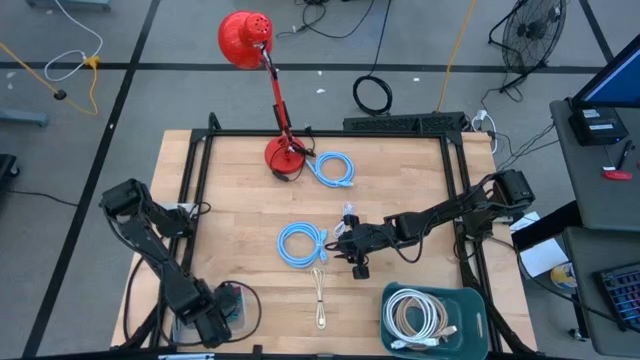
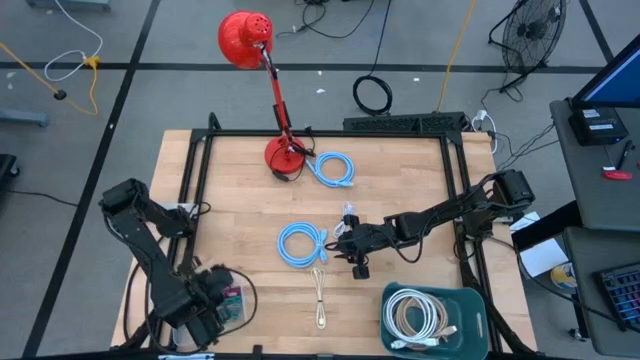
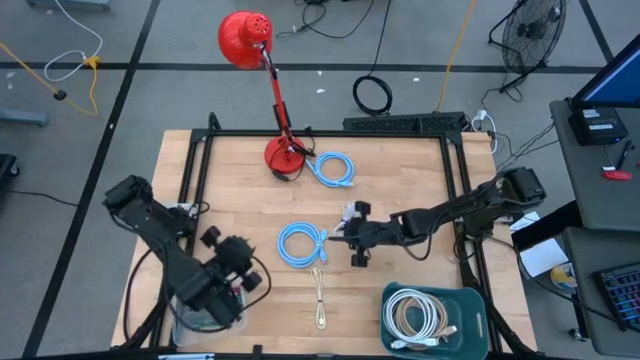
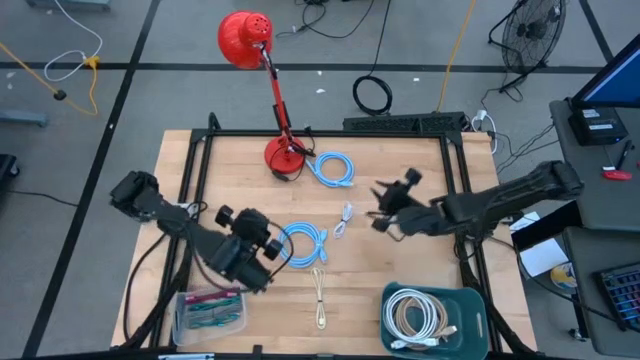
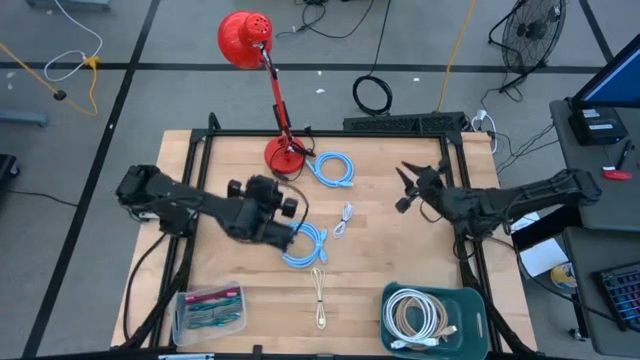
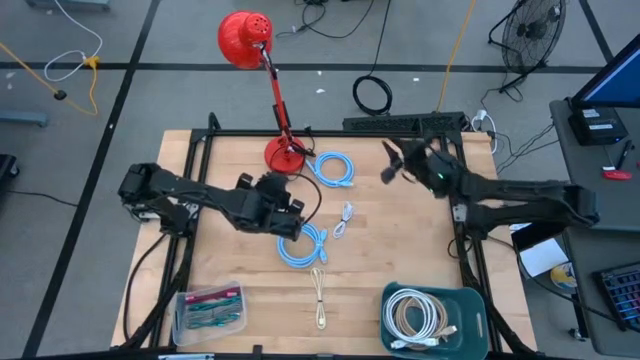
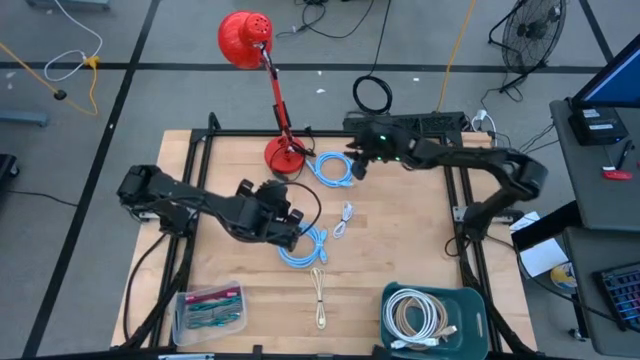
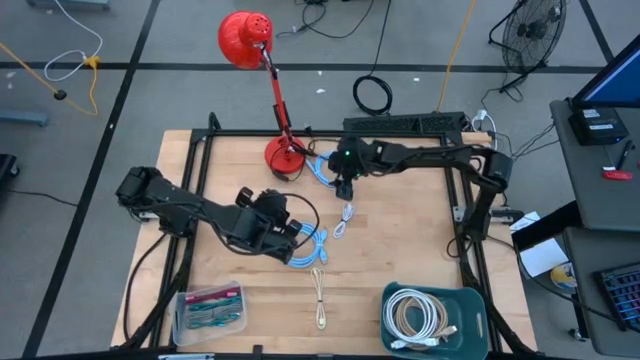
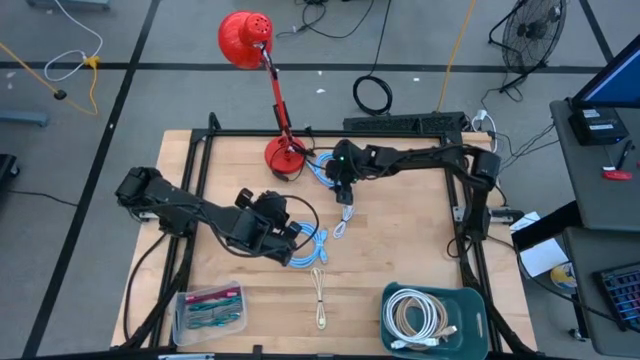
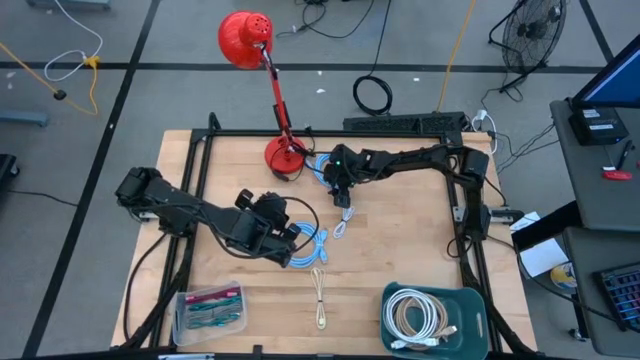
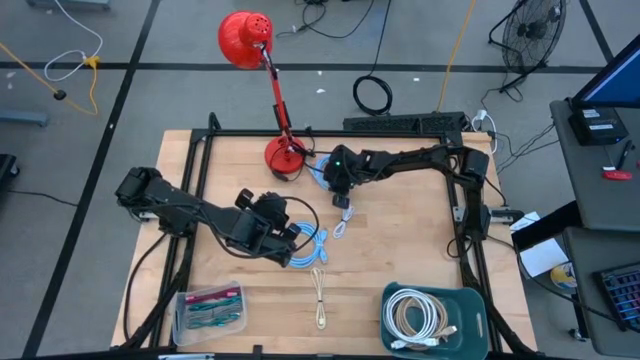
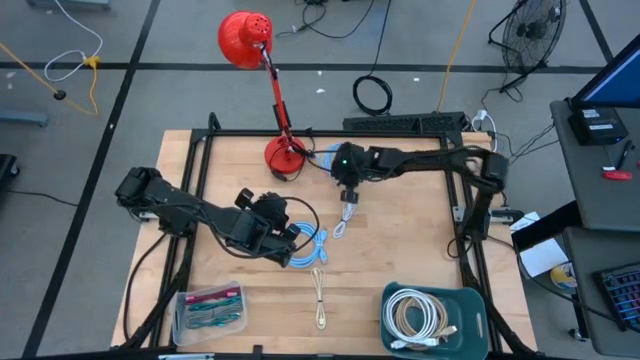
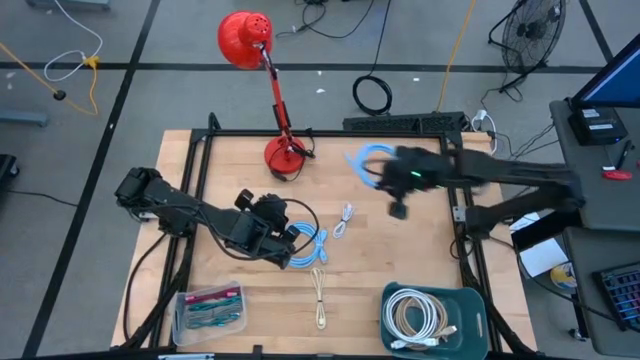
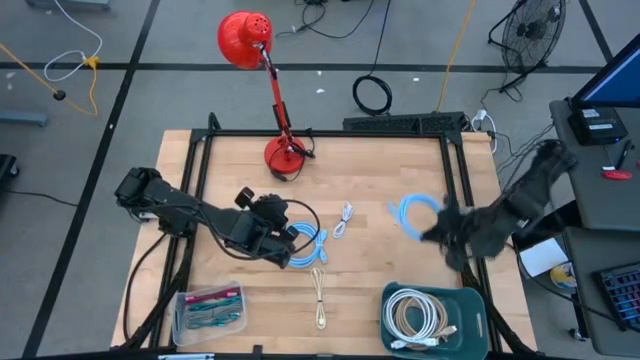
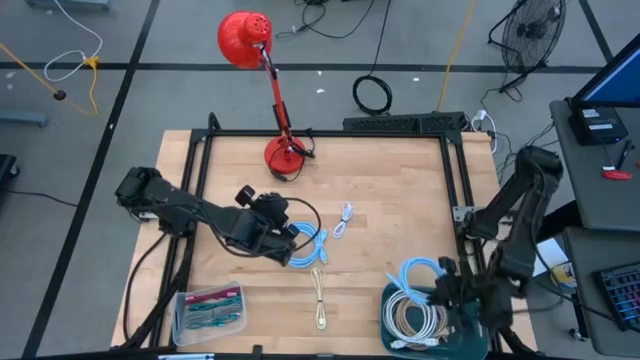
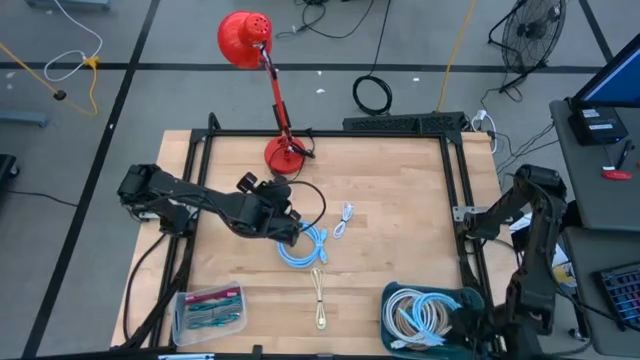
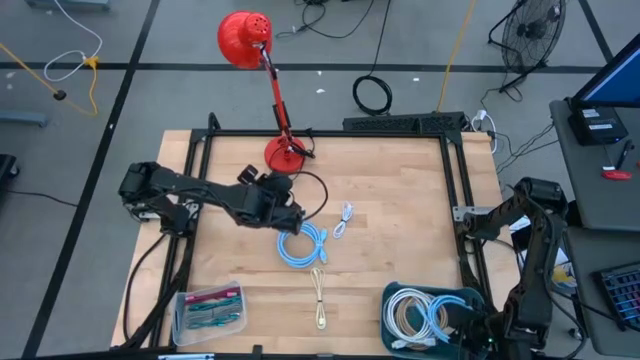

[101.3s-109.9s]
Task: Pick & Place USB Port
Put the top blue charger cable into the blue bin

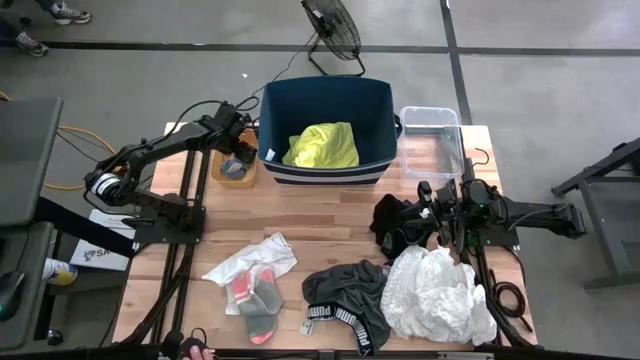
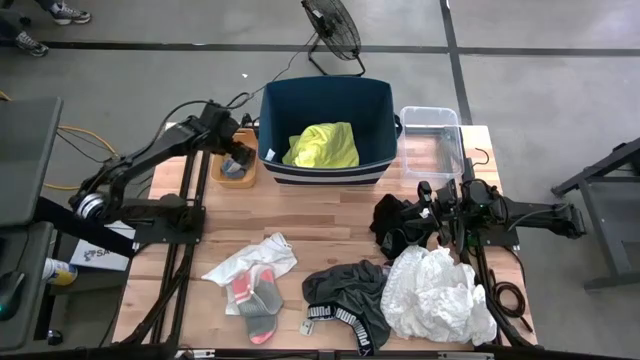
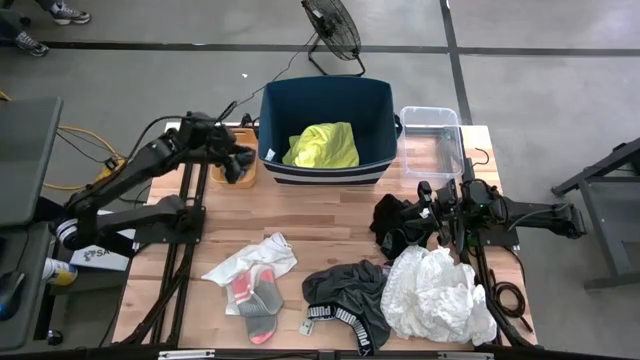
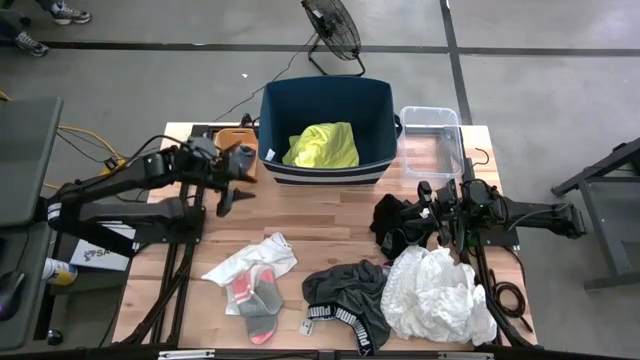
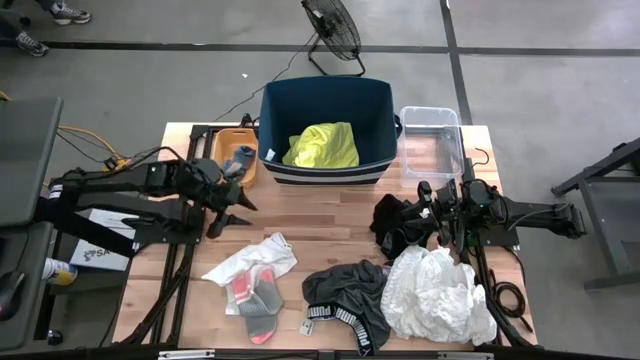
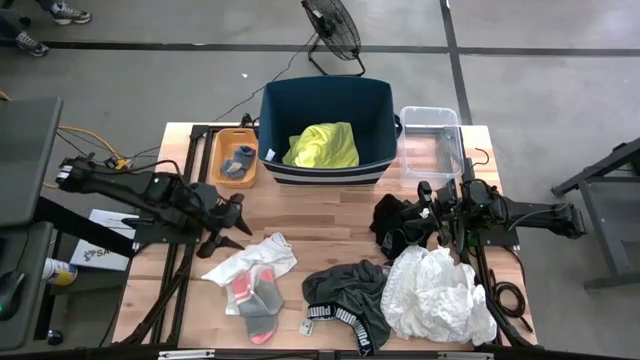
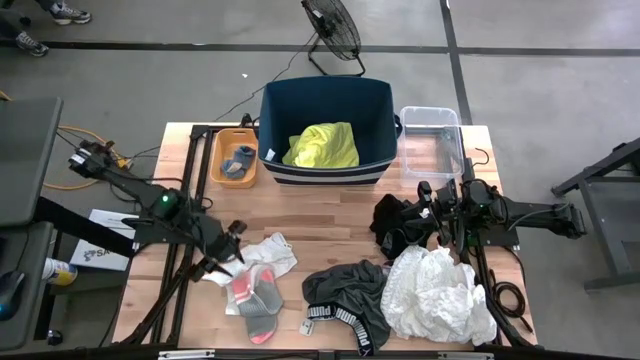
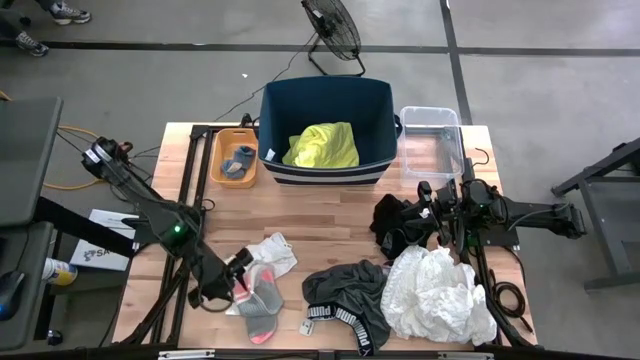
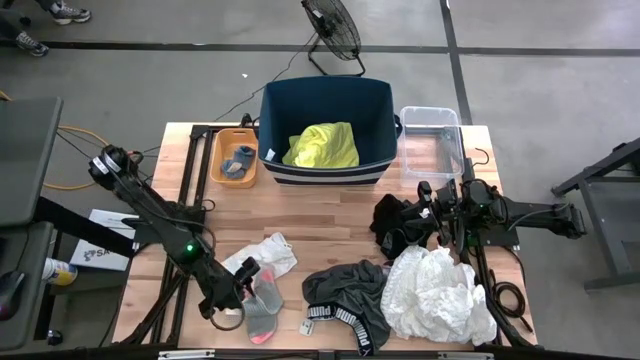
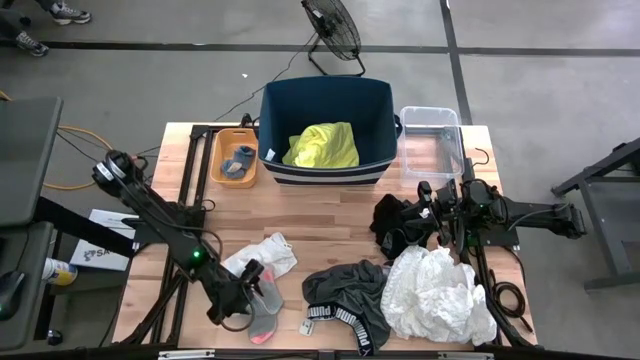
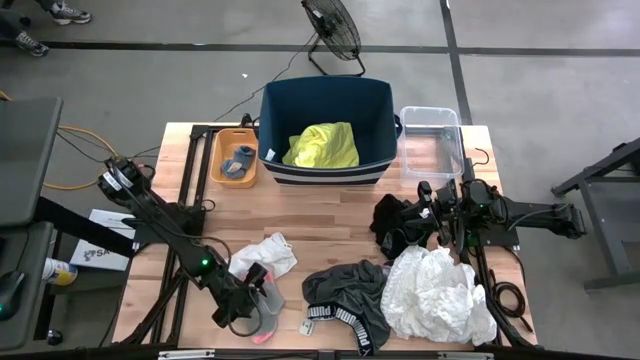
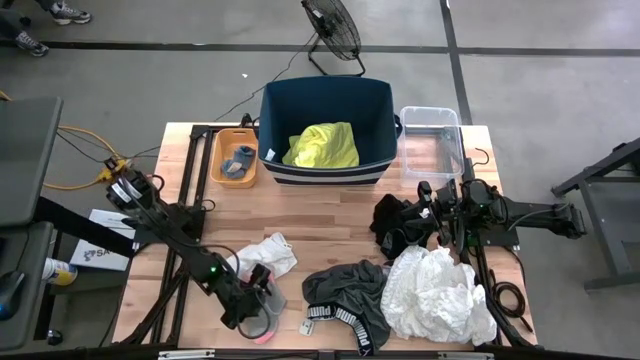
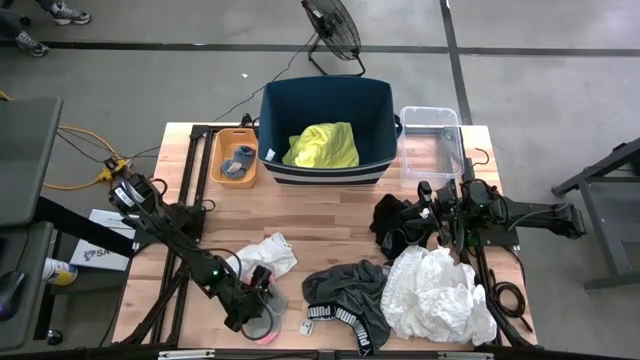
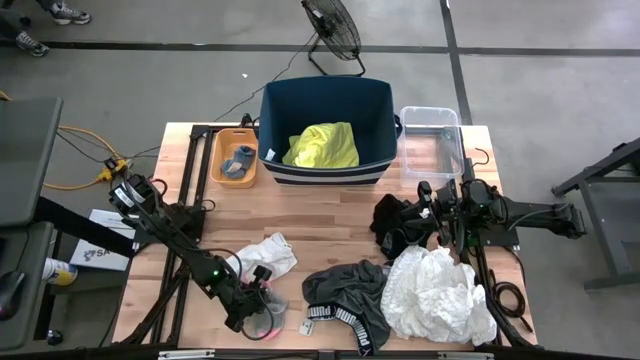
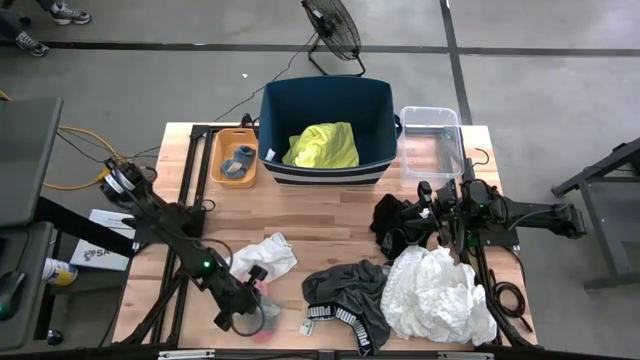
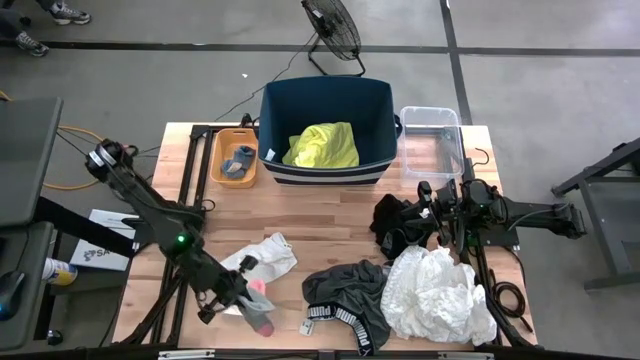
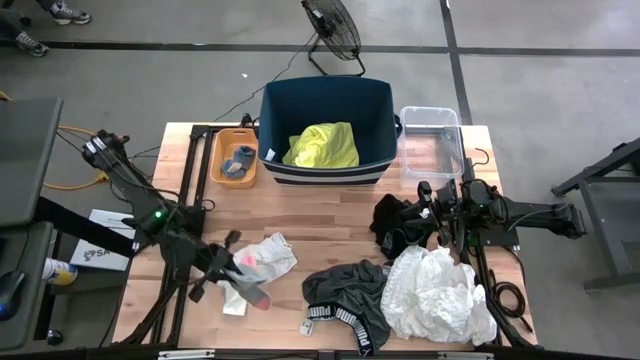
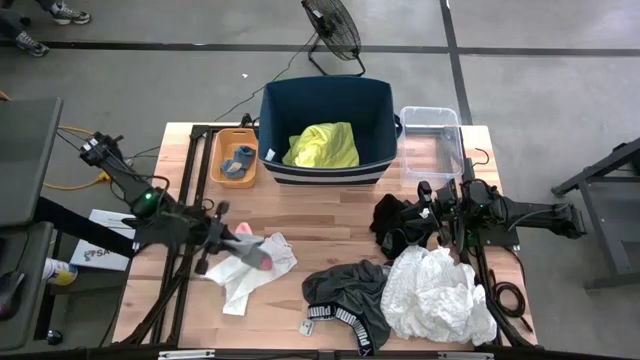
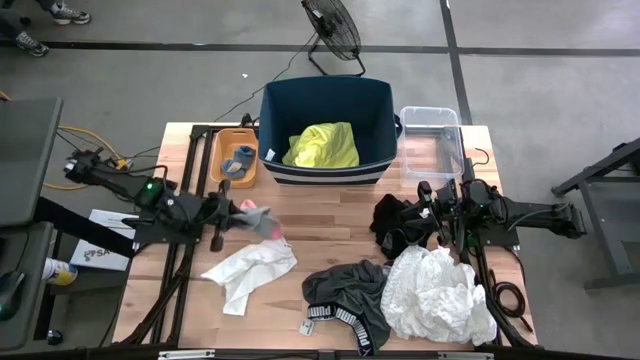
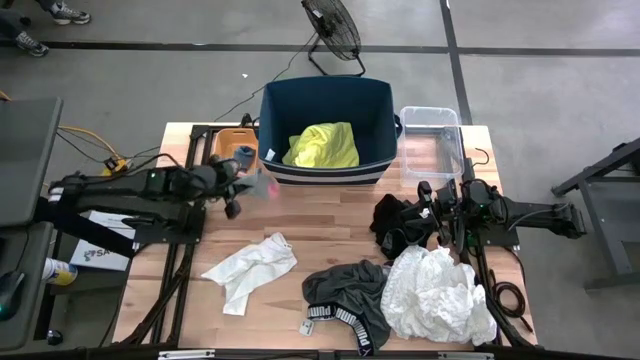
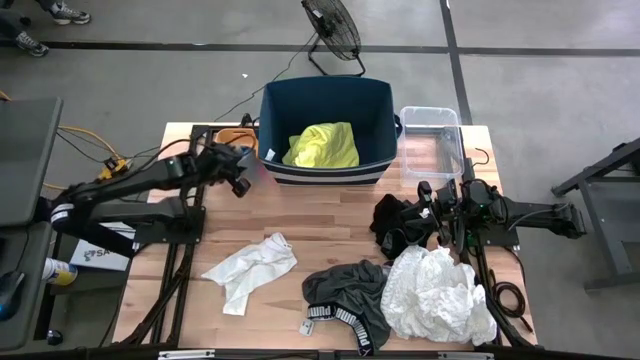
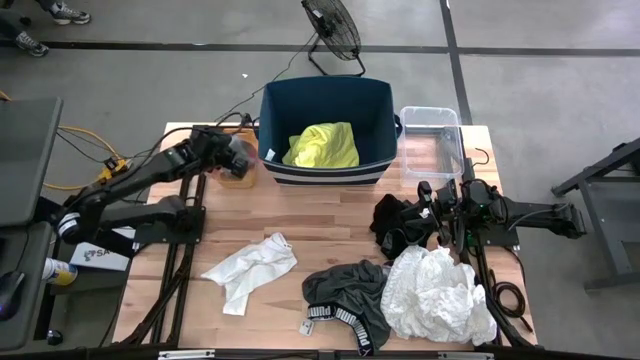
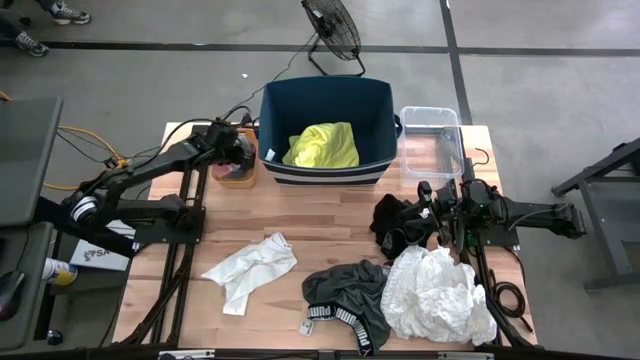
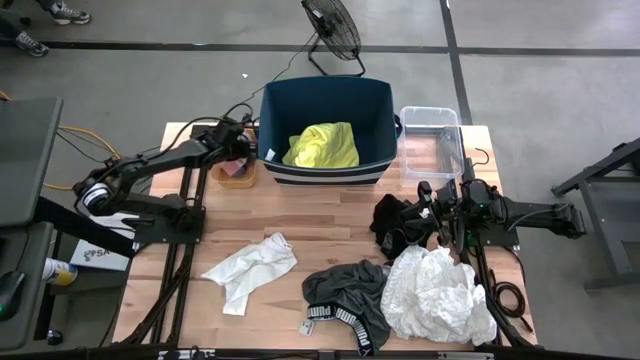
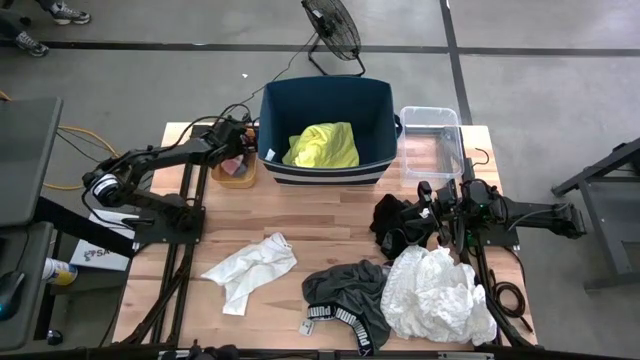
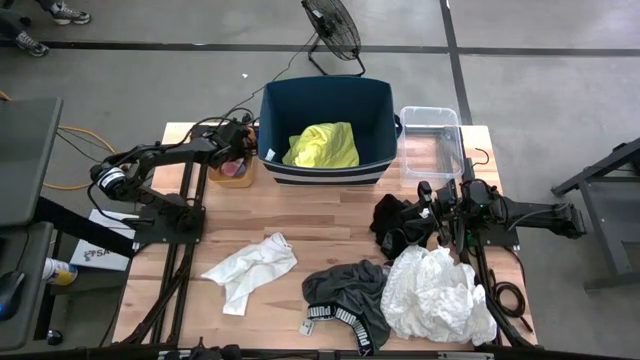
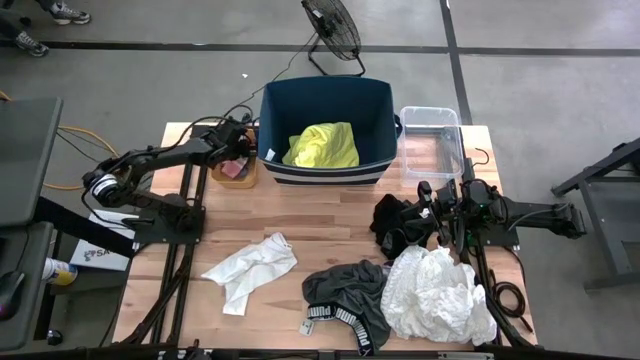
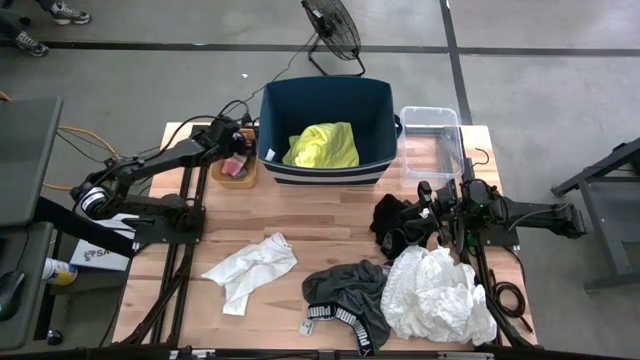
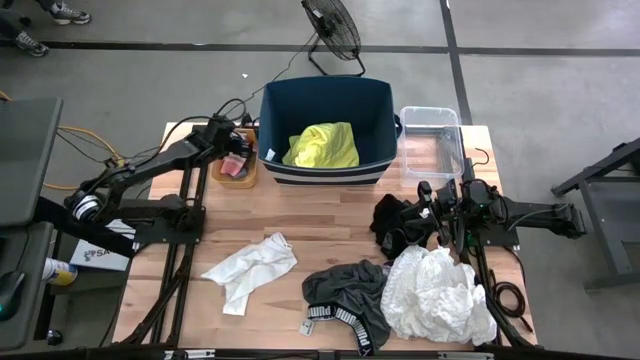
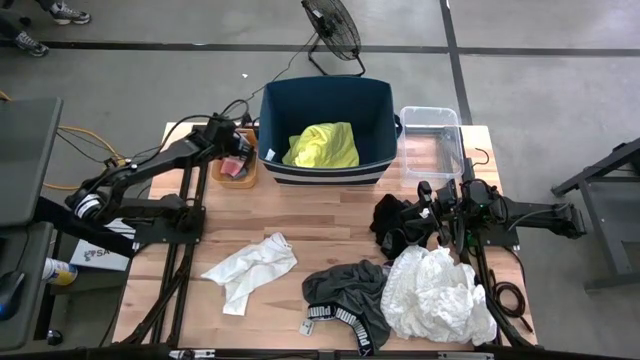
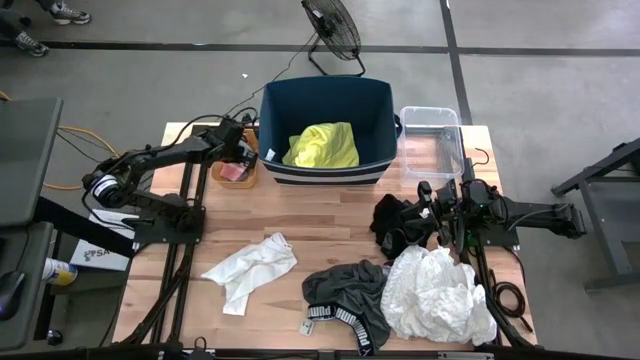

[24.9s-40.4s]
Task: Pick & Place Cloths
Put the gray pink sock into the yellow bin
